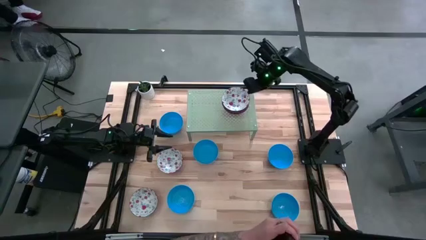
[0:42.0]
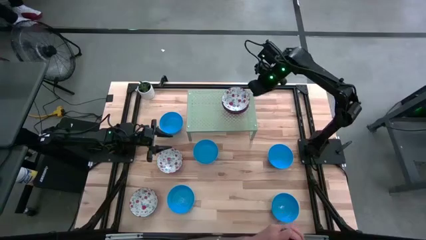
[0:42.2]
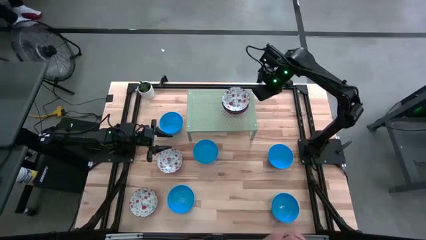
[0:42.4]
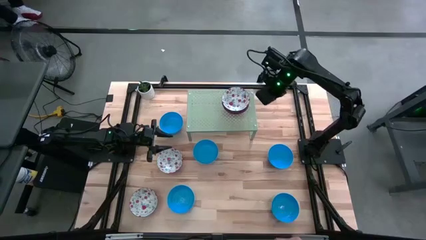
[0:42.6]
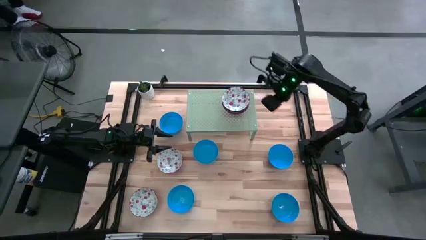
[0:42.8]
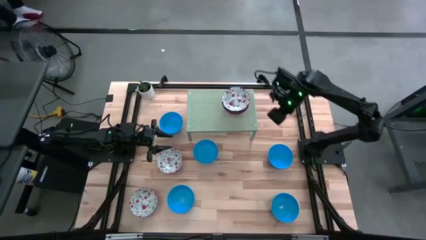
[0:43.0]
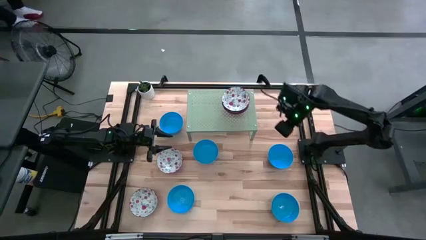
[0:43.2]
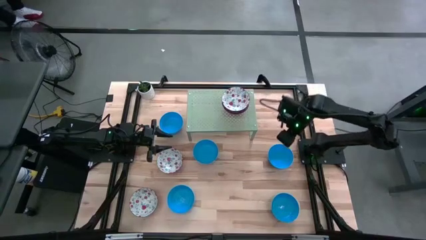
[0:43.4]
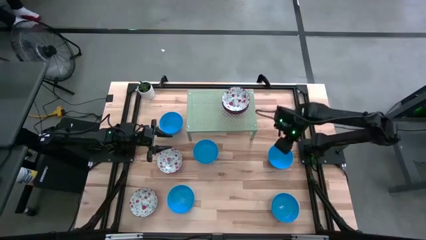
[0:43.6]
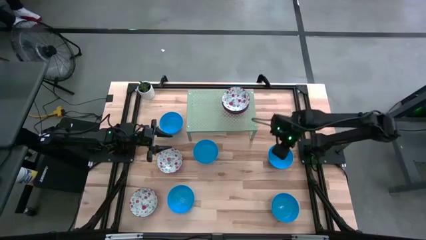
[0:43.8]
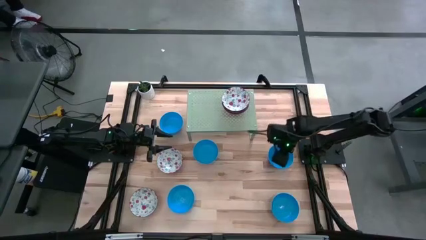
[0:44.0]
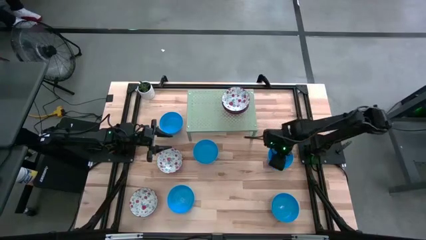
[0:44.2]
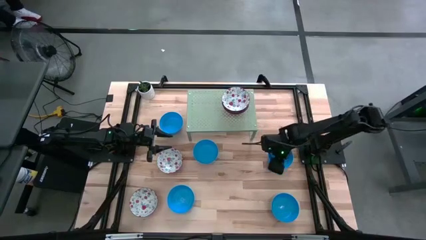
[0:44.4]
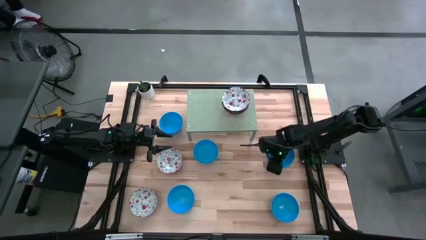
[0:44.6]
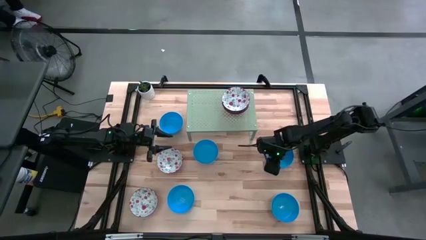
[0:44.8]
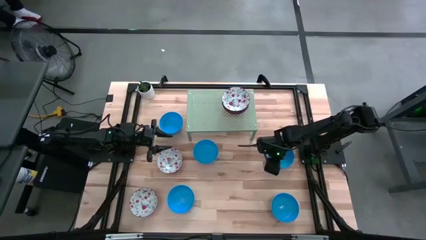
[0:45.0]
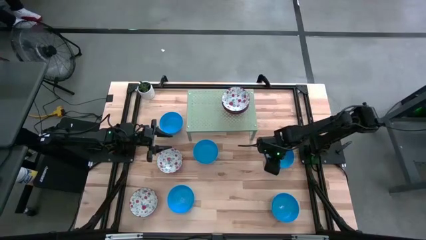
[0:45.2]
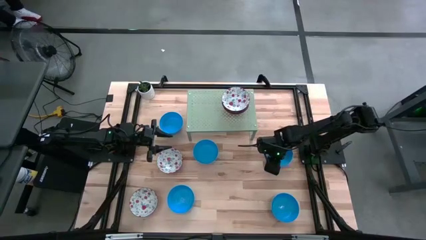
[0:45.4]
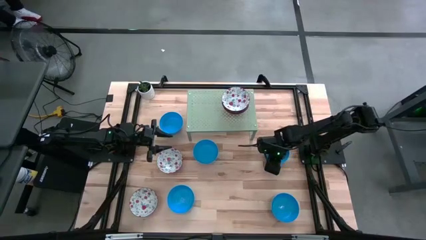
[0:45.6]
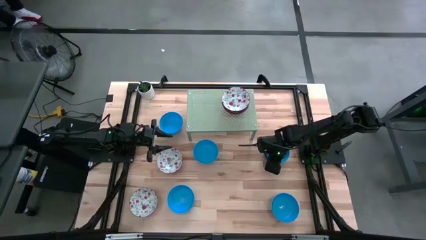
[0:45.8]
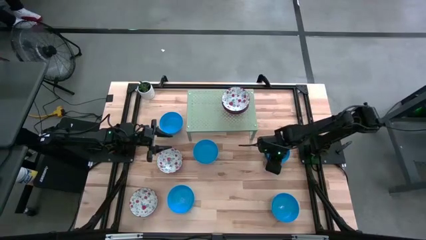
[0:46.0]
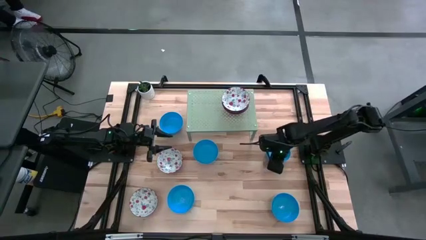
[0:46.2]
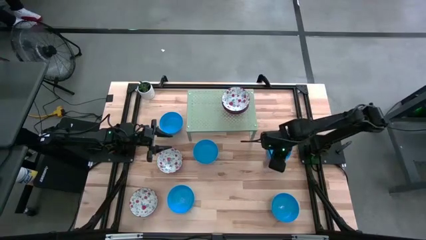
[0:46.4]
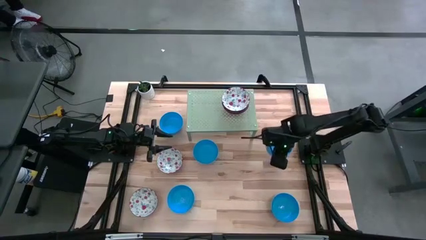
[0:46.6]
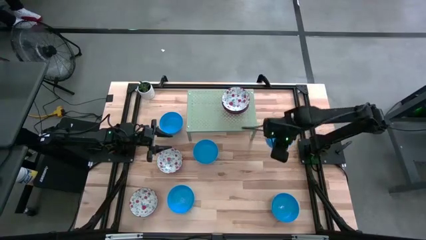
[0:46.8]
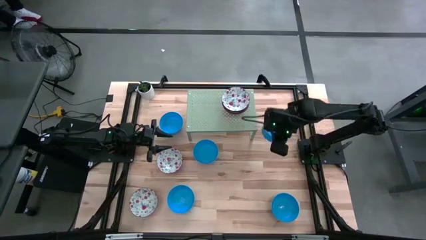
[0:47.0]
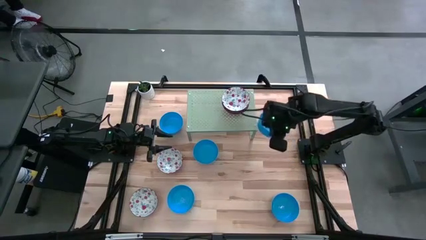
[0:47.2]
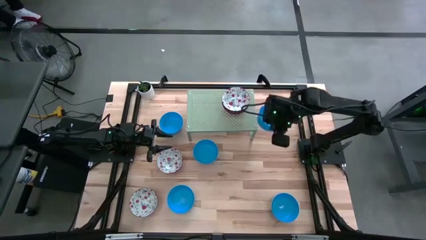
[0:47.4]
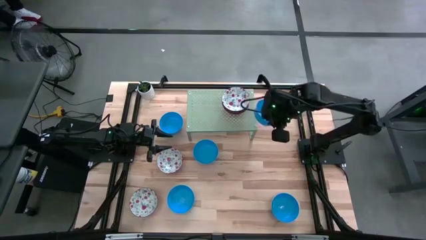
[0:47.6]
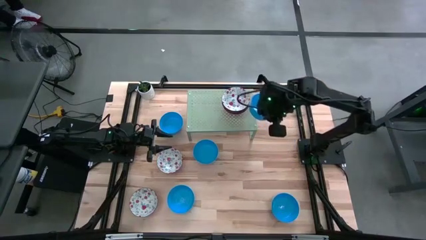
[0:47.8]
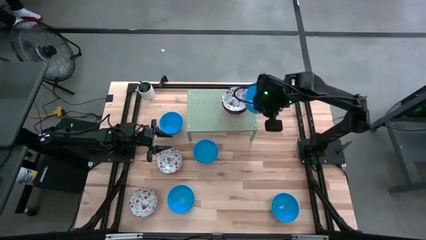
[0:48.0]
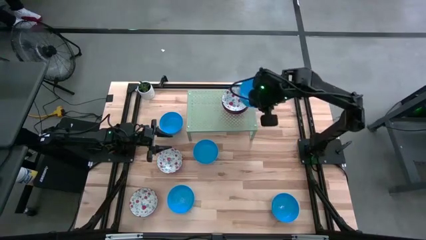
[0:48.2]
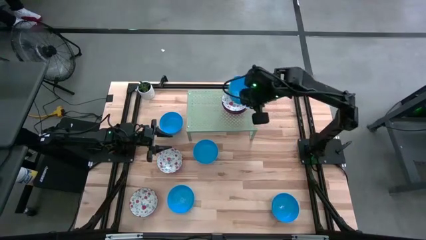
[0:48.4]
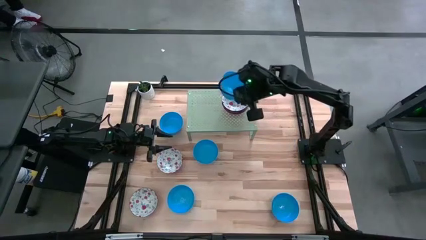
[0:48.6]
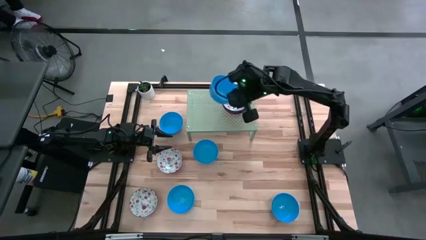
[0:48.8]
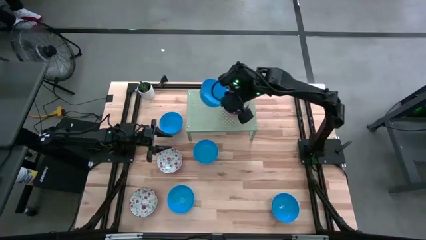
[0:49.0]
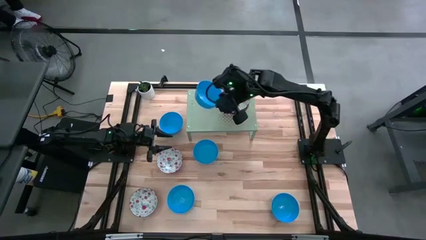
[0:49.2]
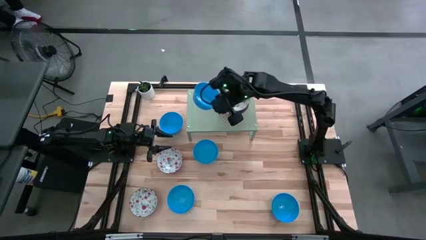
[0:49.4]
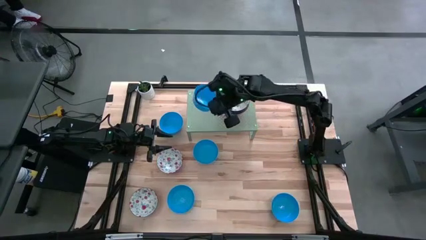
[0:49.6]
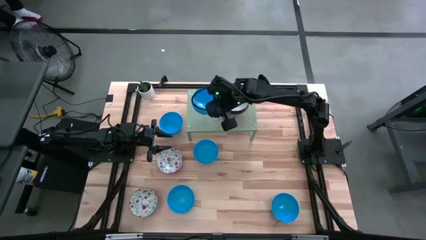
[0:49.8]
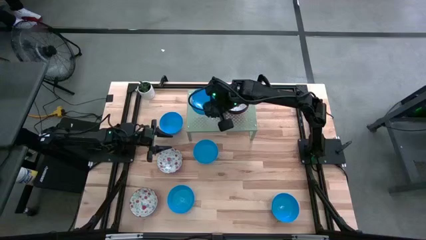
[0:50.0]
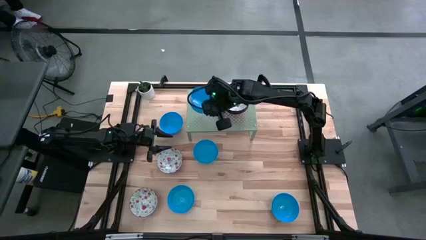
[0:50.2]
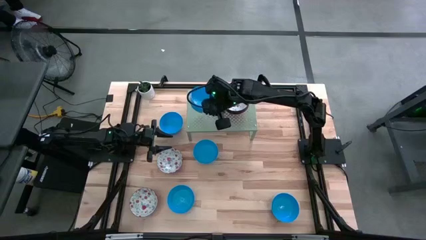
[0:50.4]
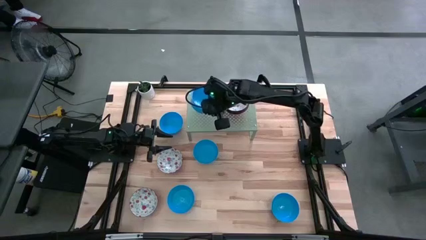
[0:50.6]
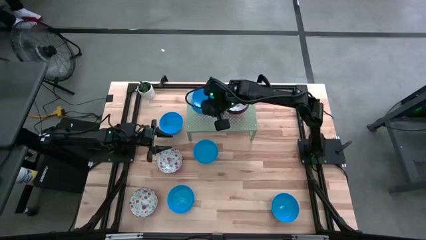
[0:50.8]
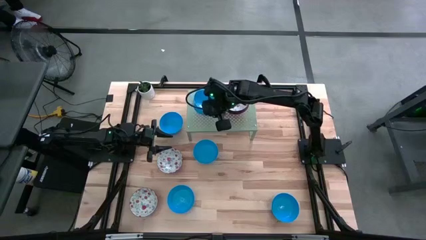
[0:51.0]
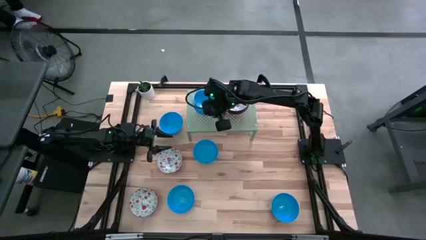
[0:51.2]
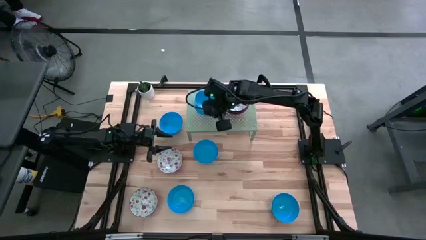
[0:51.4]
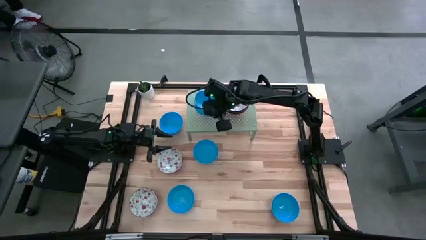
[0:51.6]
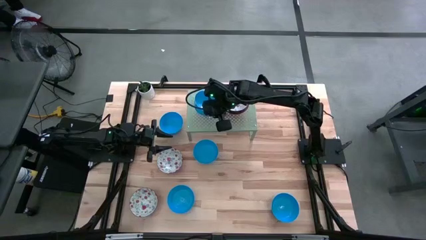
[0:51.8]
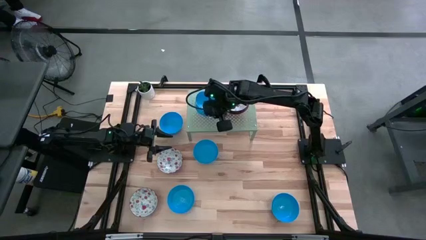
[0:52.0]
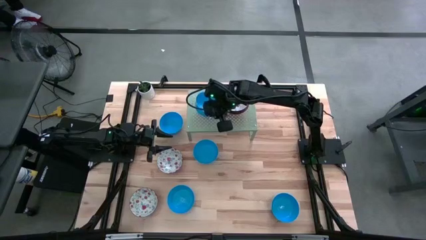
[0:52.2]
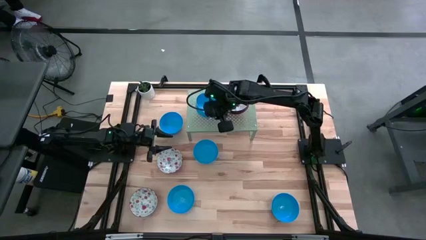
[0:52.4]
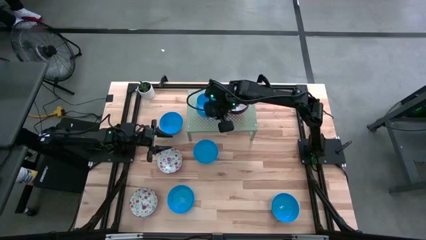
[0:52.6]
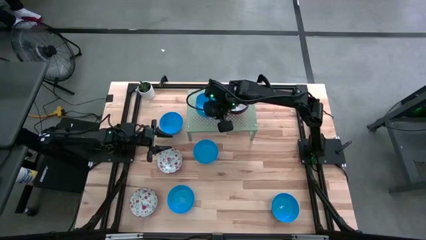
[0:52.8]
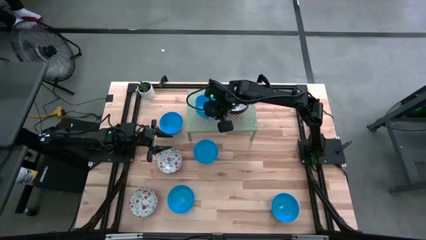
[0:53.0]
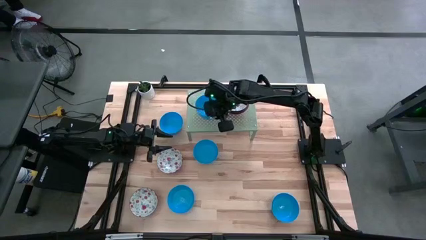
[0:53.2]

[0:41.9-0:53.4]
Task: Pick & Place Mini bowls
Put the blue bowl on the shelf
